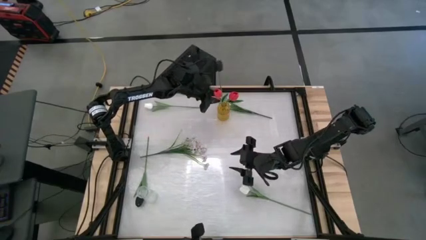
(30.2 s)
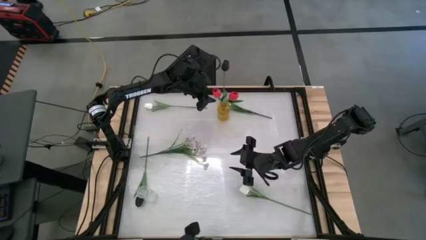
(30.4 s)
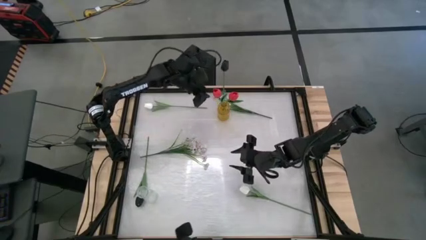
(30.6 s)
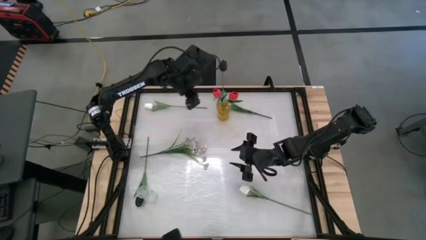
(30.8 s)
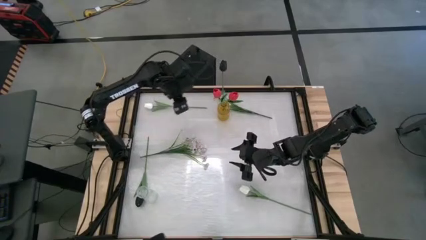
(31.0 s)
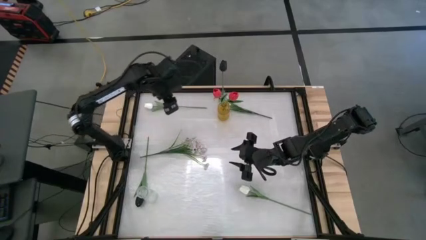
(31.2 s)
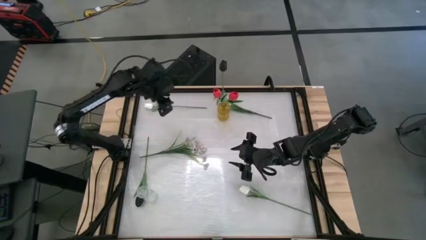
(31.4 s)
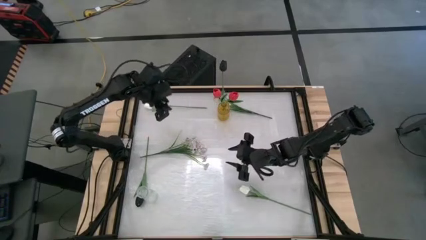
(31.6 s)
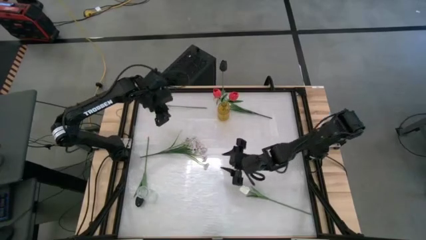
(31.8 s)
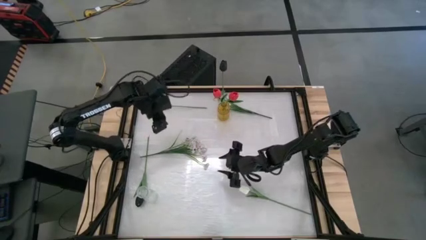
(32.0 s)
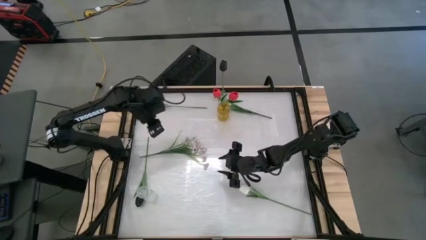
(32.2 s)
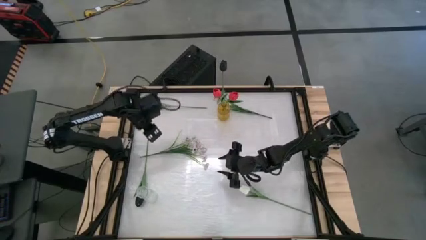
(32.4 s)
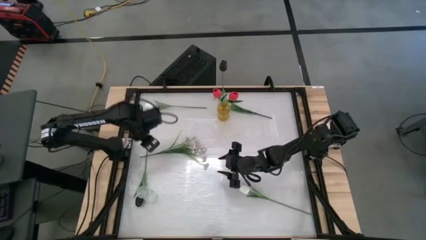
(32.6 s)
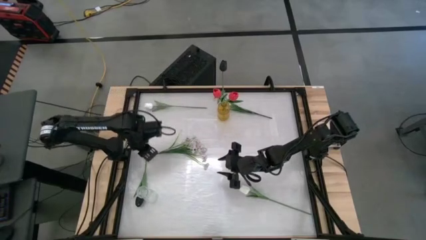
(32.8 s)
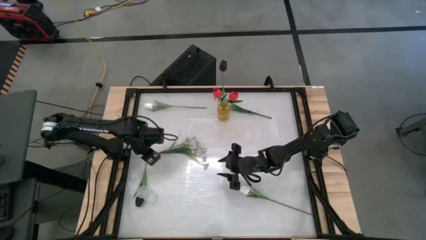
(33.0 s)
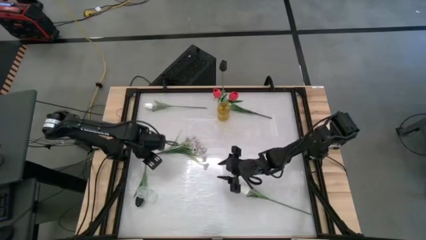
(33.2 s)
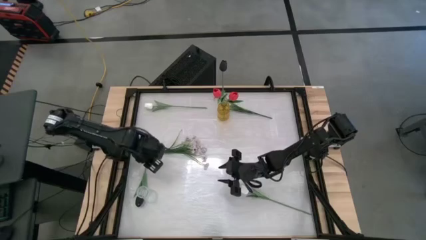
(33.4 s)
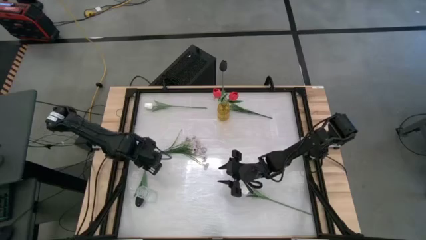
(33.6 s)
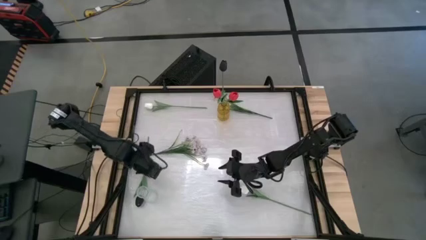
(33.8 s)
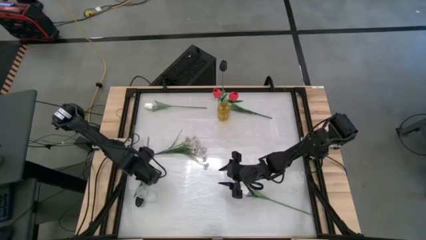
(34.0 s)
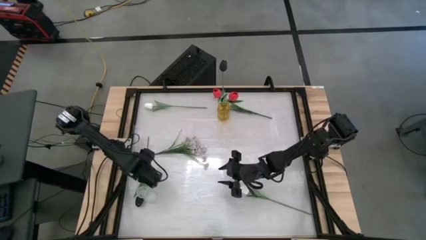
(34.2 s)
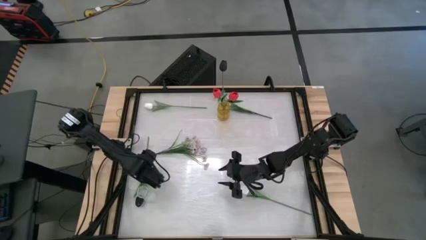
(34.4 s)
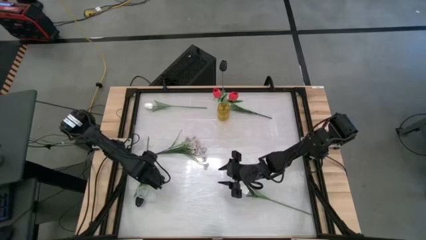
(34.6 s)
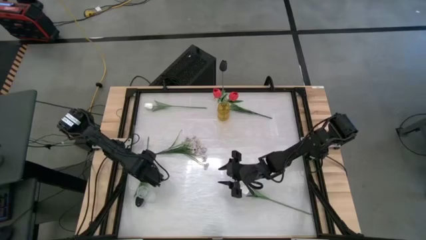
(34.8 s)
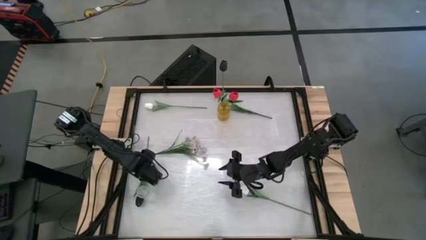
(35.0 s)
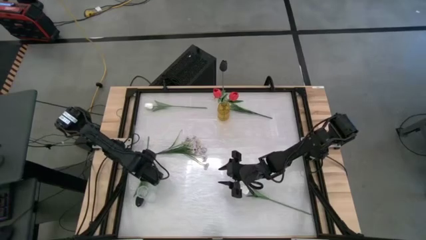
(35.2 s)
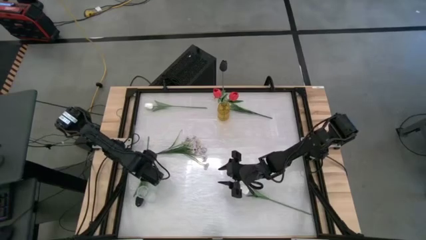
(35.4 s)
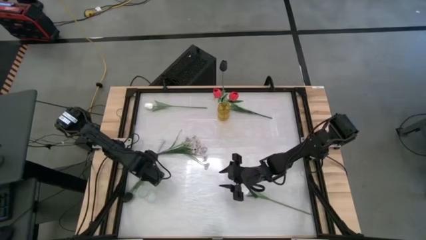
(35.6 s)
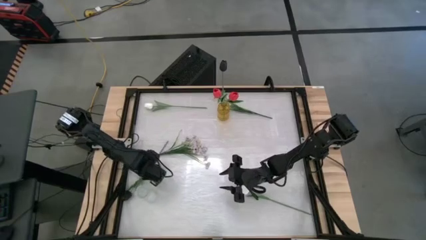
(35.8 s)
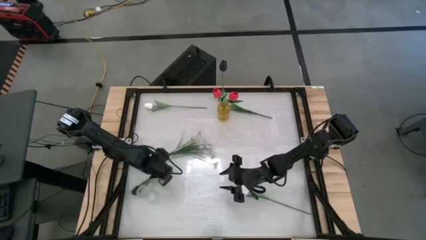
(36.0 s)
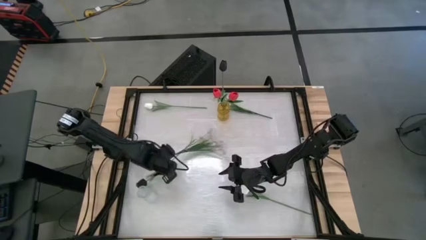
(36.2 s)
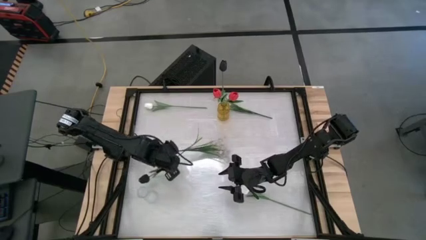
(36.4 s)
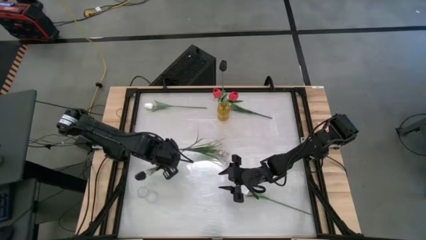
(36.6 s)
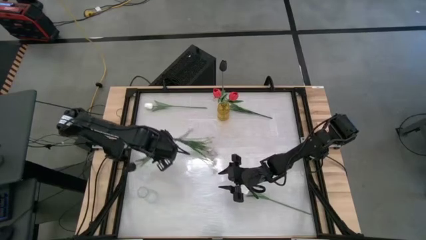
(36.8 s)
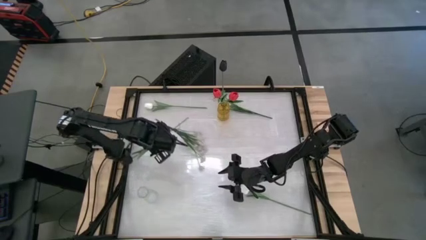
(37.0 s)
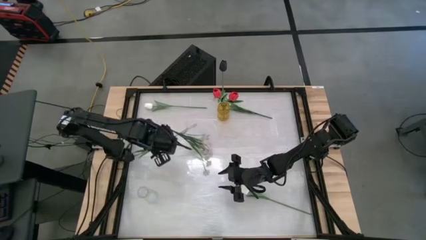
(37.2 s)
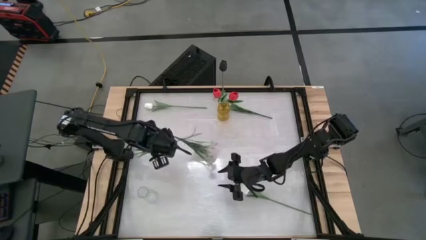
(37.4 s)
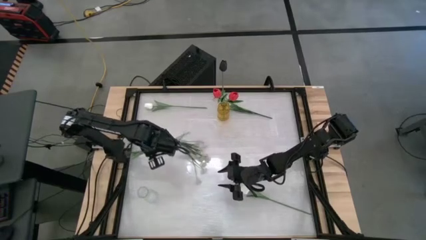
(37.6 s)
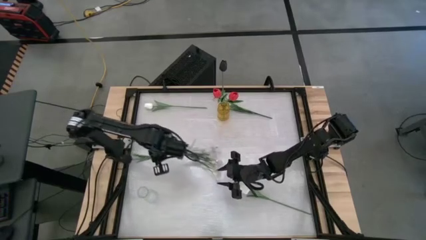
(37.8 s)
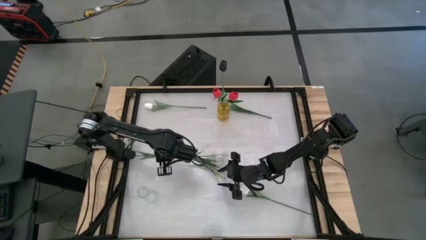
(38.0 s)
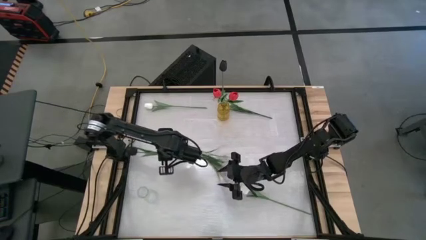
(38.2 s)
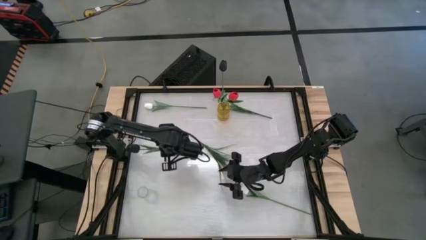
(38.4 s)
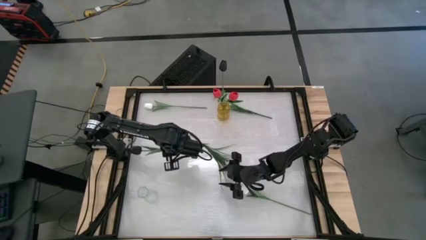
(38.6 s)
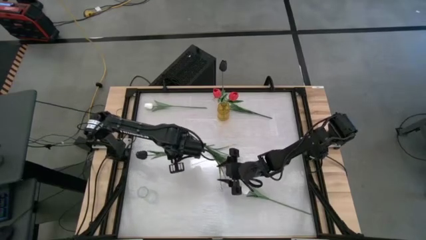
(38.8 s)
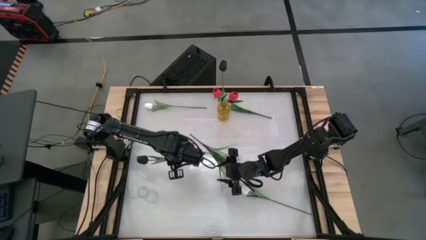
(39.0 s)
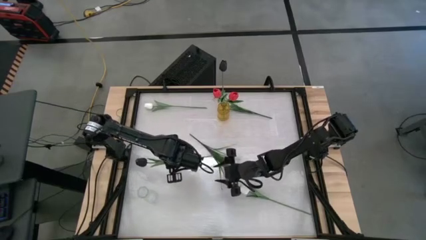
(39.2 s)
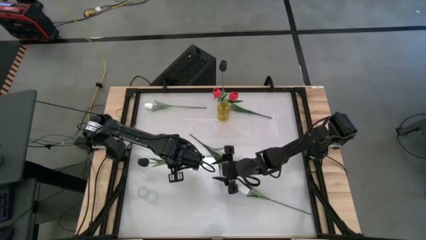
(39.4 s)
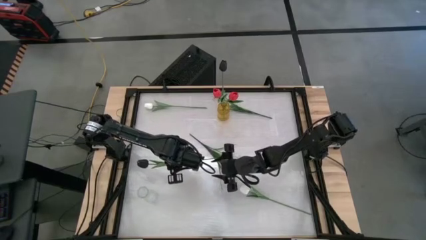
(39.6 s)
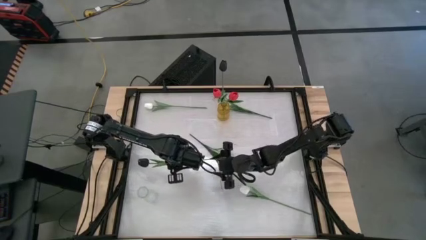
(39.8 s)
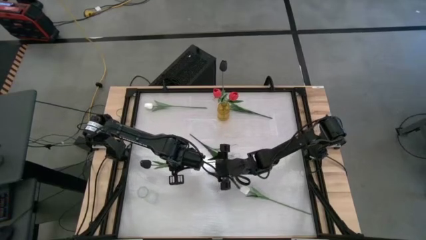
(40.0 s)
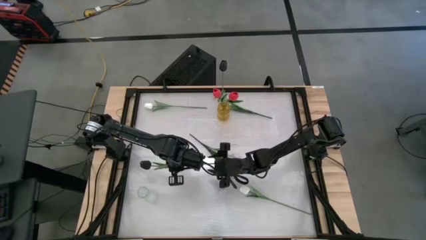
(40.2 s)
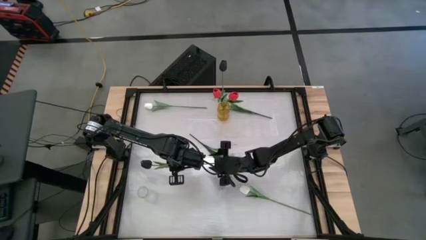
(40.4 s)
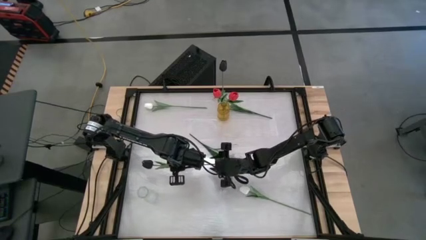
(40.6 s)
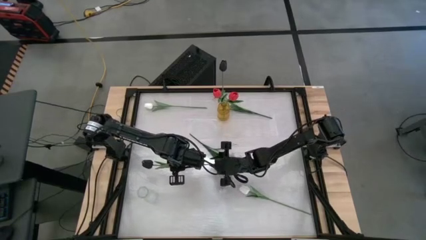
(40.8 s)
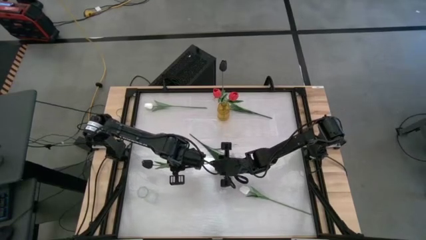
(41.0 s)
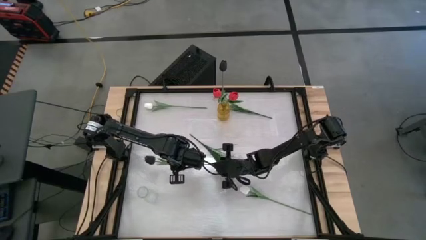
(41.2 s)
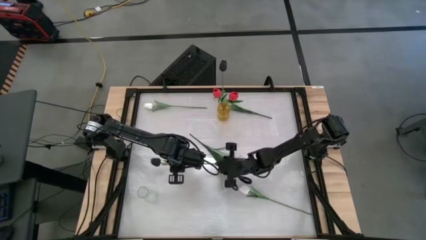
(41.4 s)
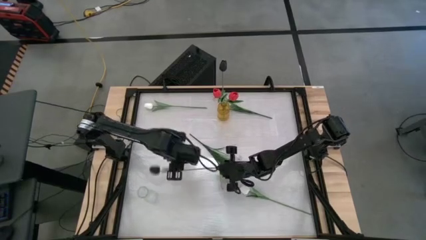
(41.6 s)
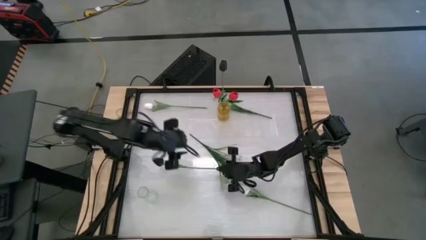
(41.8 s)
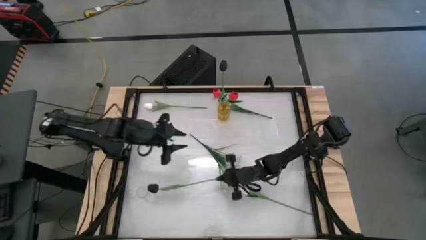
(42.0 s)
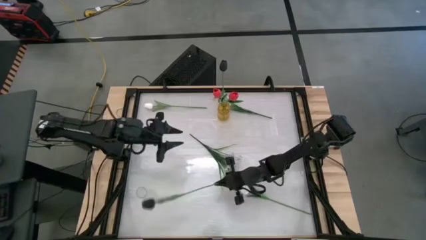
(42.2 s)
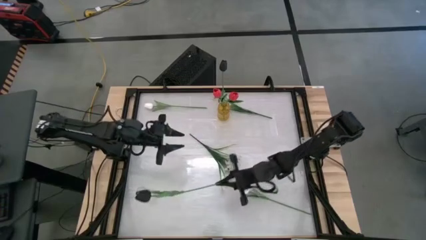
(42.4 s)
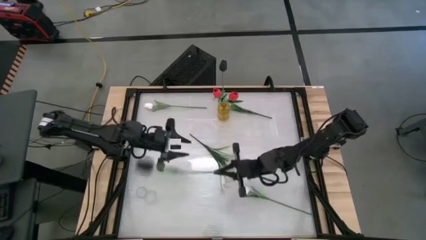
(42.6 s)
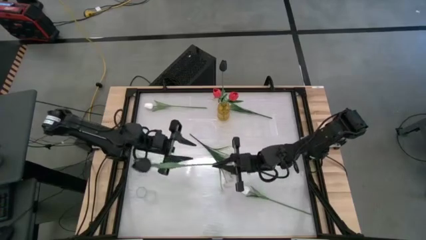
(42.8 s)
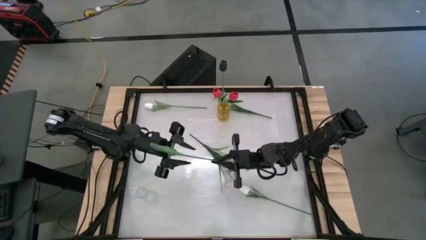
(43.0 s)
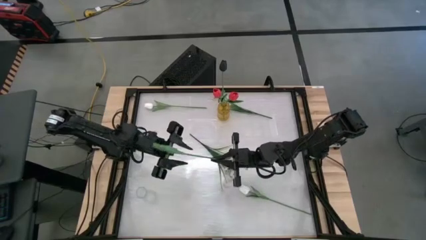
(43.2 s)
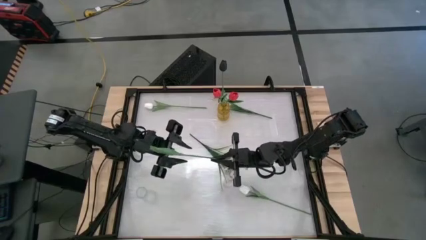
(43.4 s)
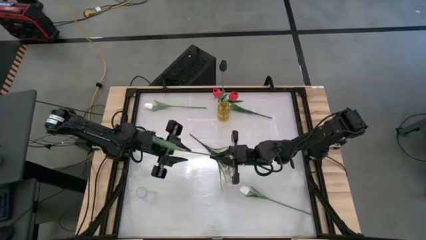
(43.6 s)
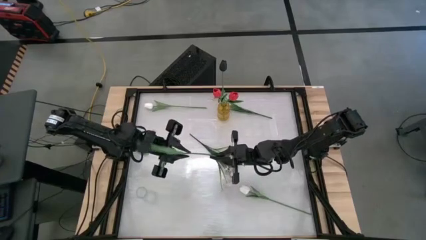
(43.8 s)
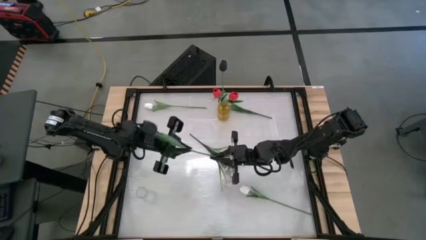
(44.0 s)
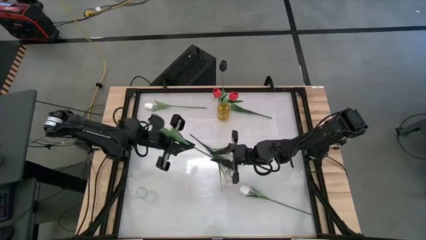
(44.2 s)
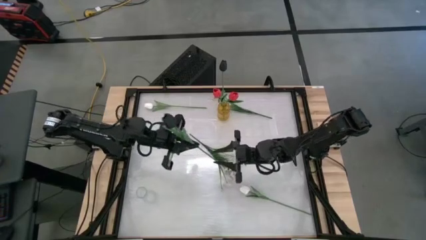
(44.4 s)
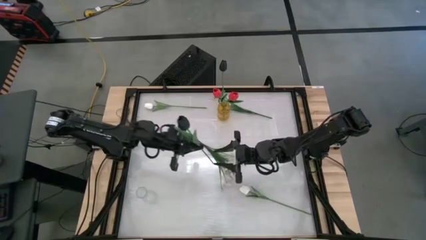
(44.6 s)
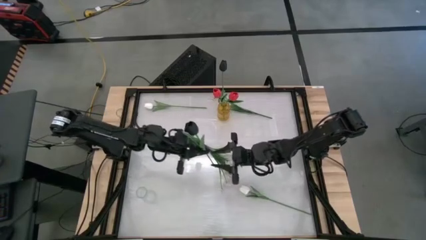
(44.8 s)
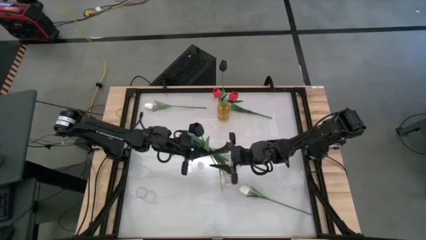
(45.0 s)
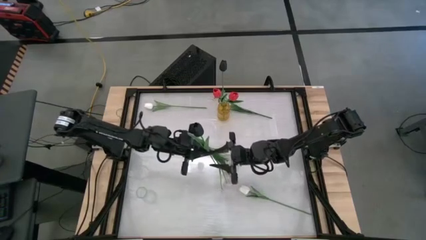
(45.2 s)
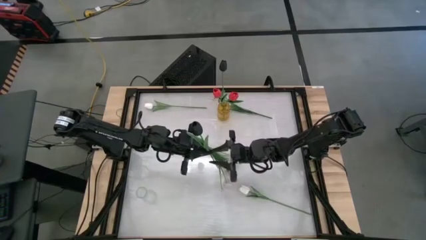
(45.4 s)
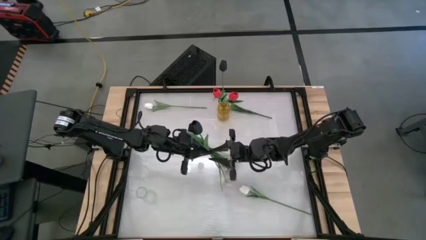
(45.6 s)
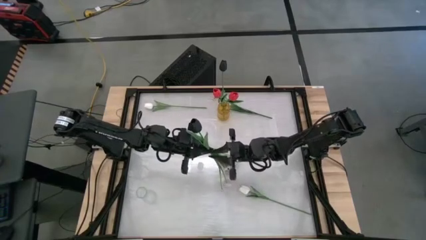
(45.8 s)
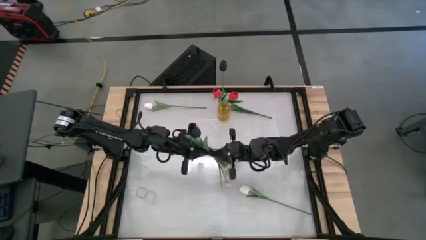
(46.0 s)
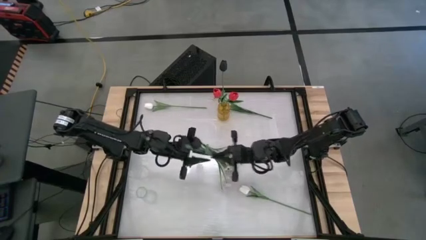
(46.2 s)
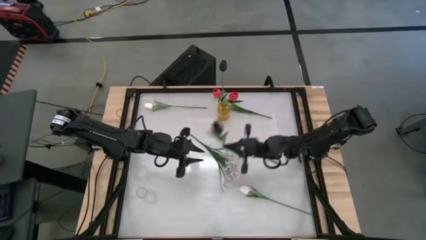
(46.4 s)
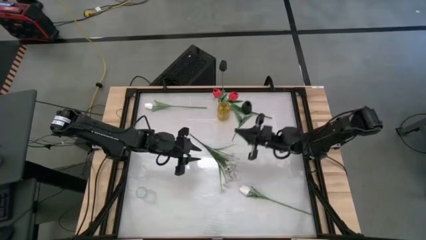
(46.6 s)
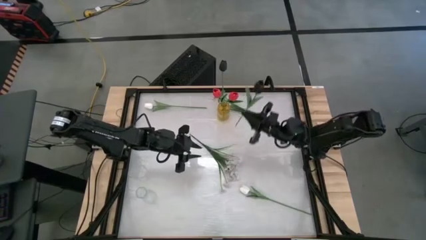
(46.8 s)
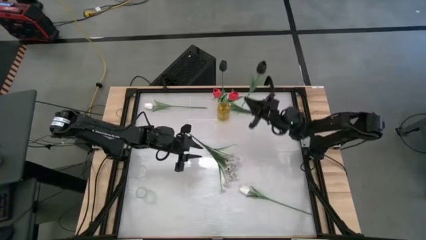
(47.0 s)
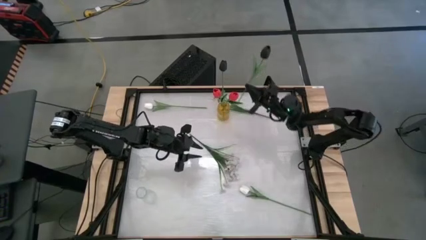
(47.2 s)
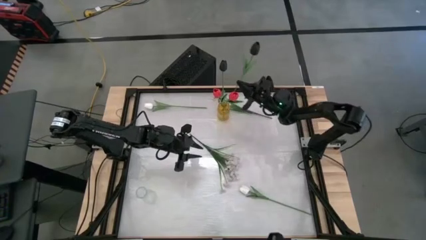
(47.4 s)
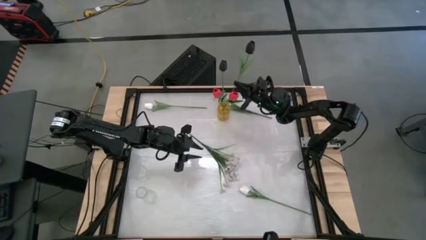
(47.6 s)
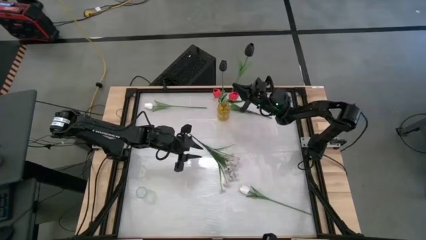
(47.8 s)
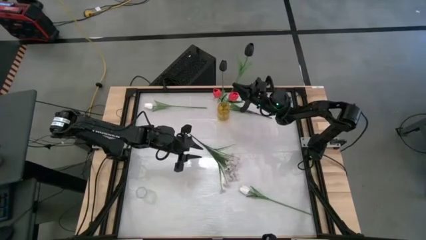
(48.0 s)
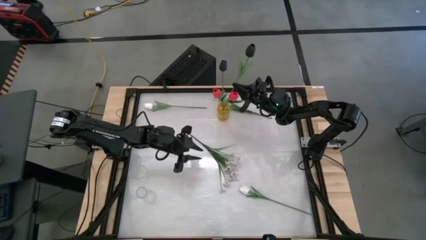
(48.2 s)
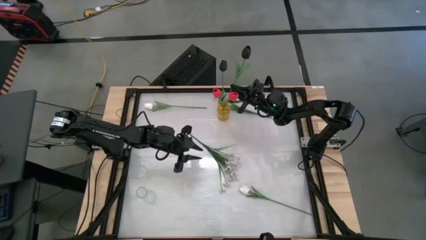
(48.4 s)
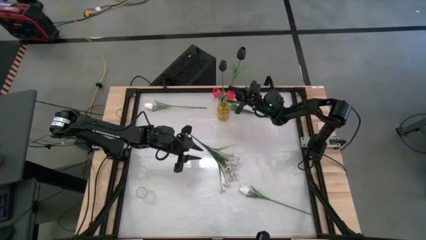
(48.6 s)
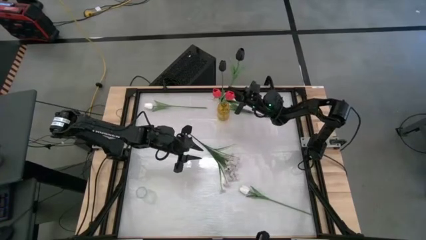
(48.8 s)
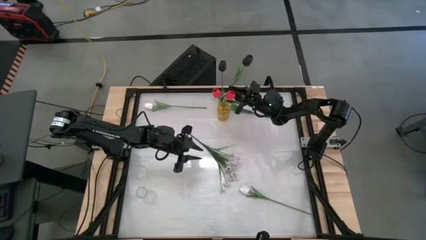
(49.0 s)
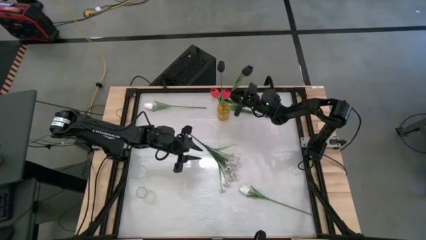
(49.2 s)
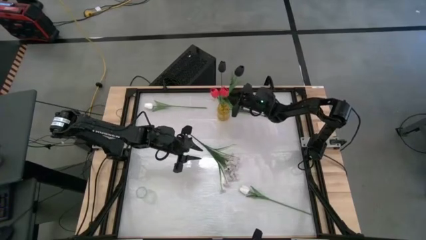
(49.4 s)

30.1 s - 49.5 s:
Task: Sort flowers into vase by color
Put the black tulip into the yellow vase
